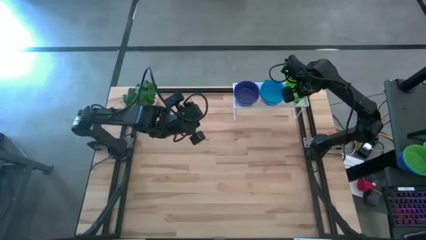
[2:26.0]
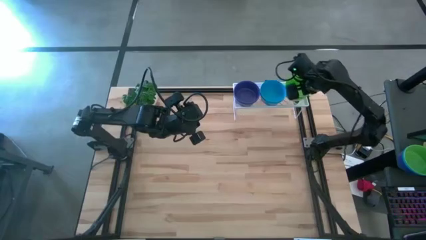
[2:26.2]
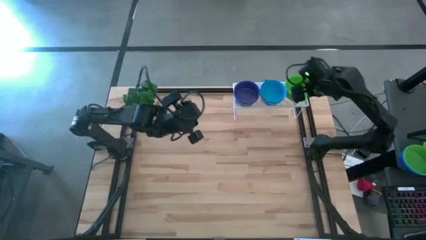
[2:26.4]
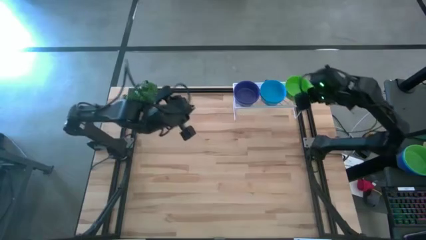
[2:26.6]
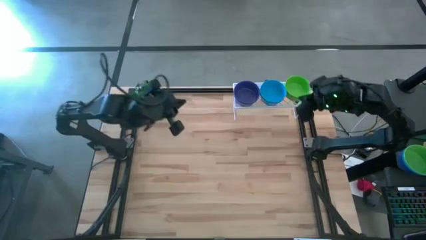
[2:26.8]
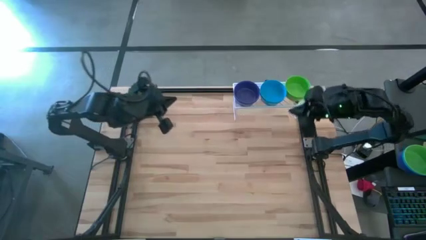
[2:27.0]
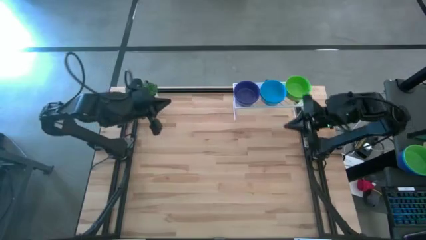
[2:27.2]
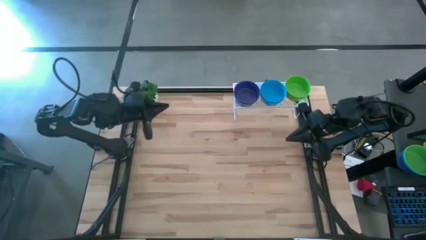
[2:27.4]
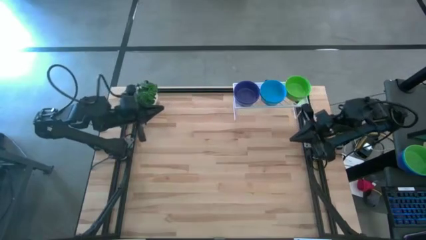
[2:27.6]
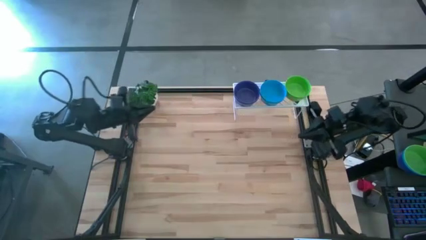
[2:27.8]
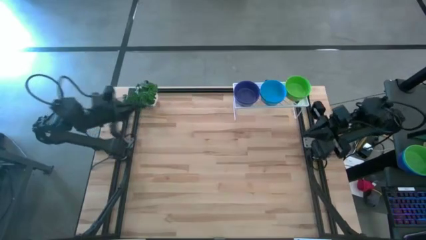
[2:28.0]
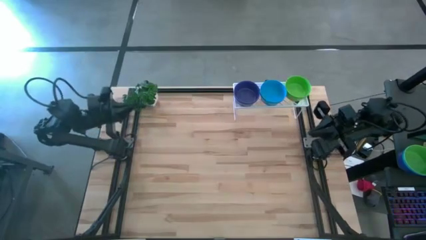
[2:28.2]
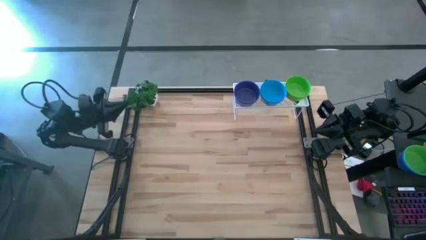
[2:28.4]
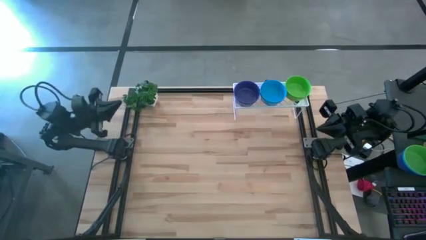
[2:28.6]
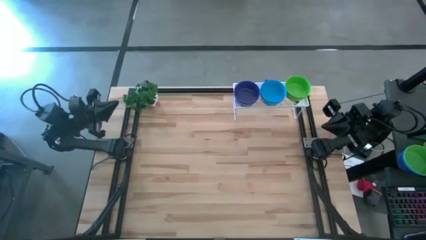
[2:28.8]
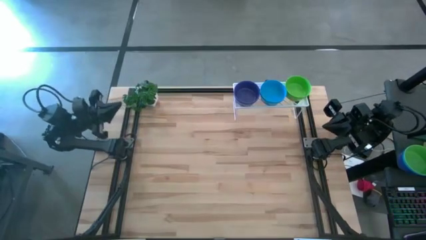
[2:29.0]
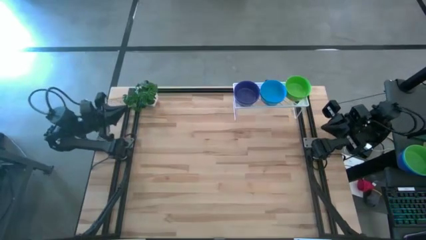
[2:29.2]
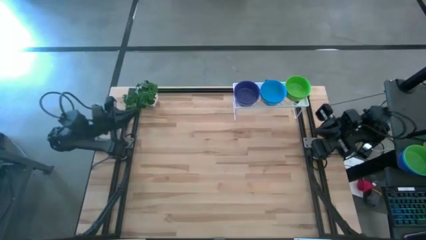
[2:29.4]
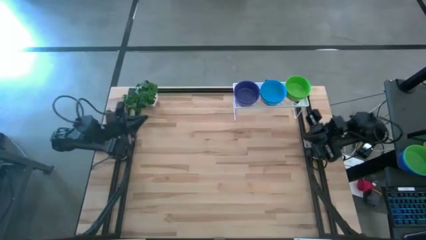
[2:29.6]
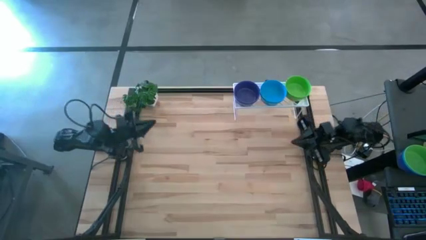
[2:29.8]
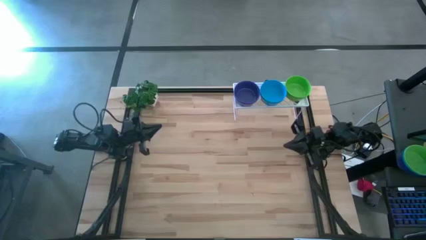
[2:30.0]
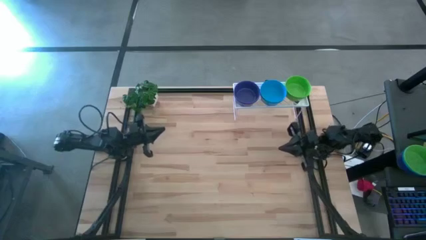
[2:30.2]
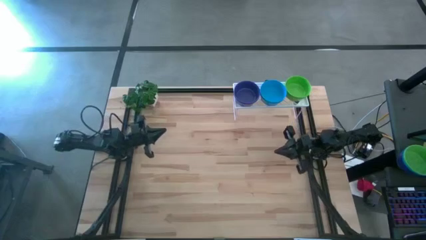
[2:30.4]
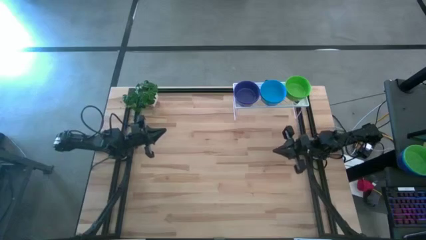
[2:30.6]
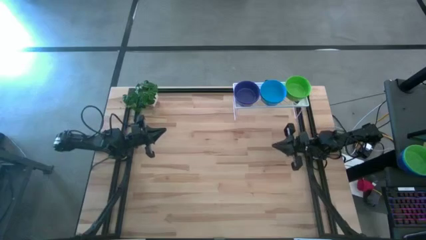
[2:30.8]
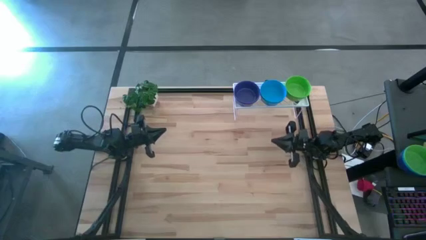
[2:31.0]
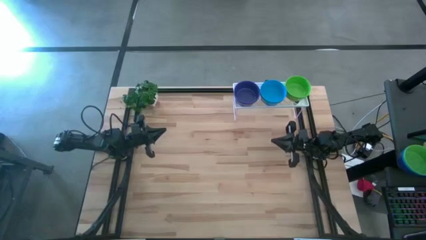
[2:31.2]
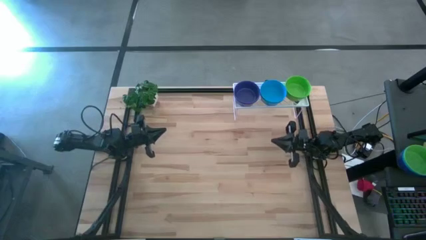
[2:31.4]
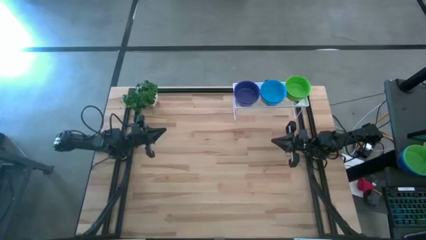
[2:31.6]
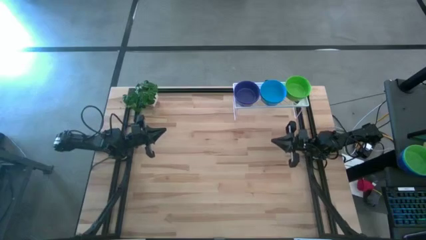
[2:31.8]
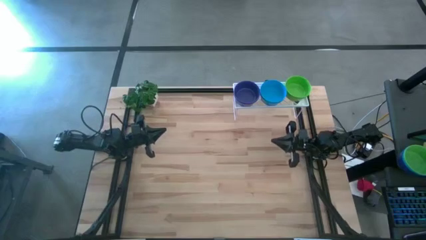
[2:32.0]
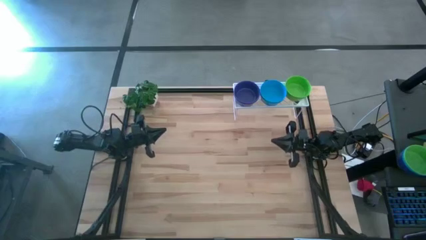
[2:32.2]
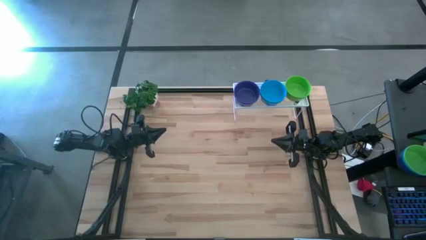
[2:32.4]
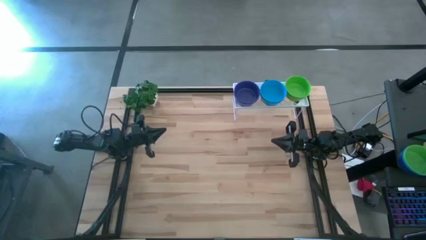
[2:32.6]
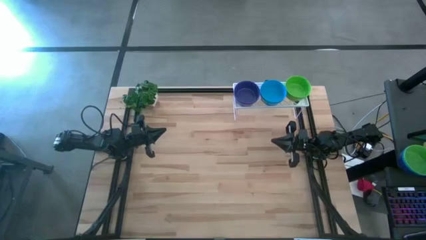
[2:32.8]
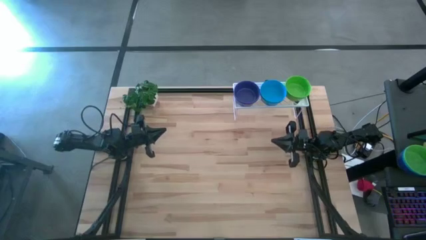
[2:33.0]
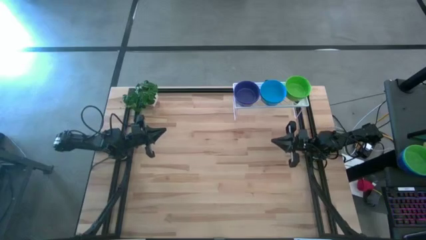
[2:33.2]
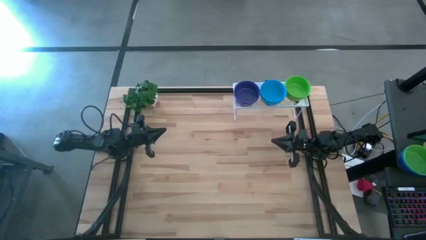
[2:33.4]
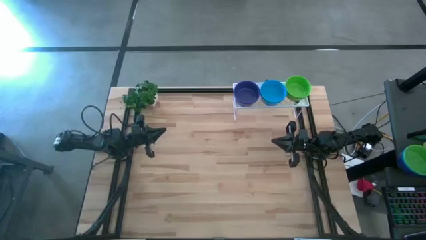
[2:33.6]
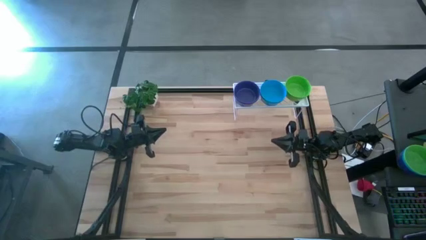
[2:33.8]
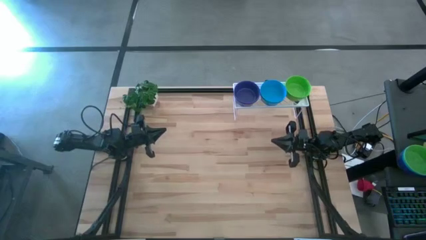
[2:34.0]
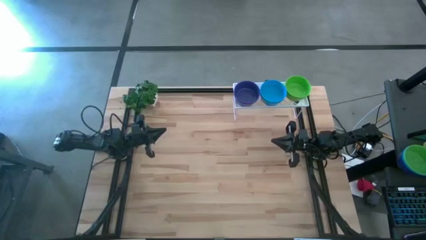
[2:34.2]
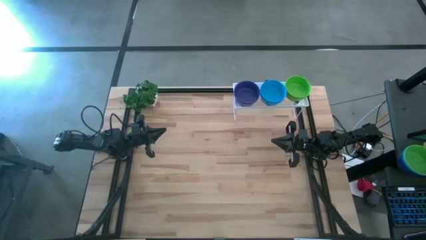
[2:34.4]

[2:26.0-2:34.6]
Task: Pick & Place Mini bowls
Return to Home Position

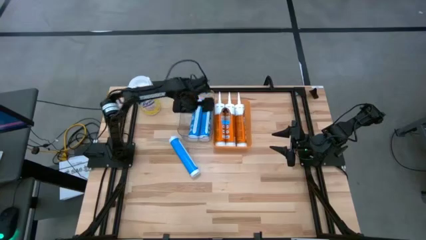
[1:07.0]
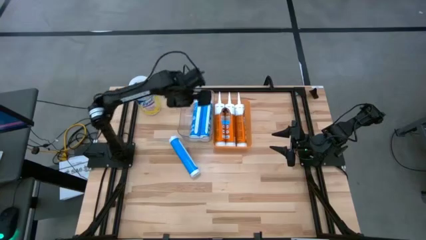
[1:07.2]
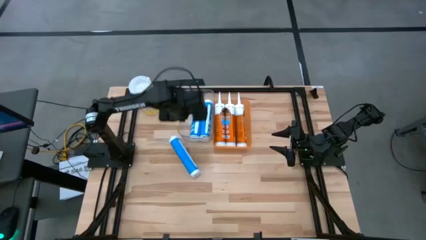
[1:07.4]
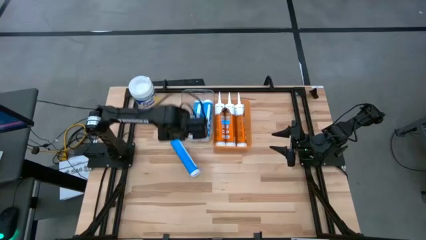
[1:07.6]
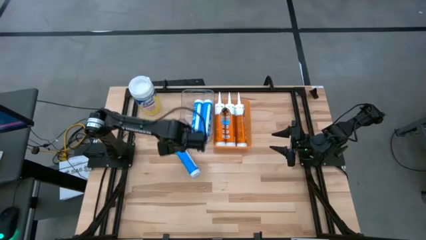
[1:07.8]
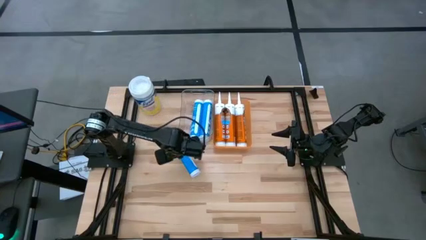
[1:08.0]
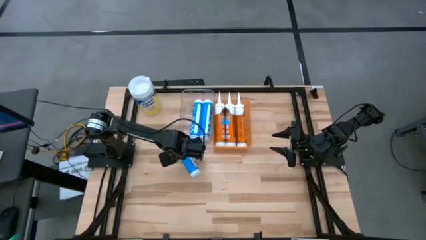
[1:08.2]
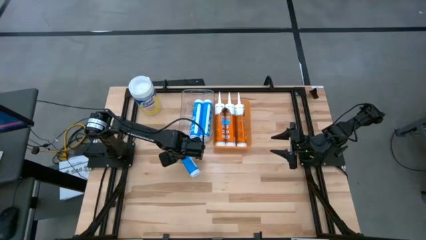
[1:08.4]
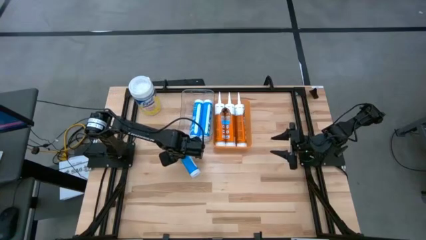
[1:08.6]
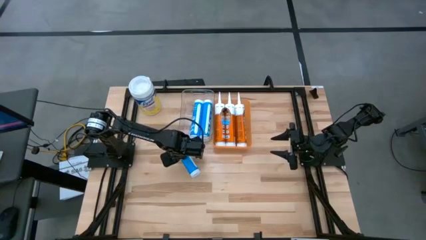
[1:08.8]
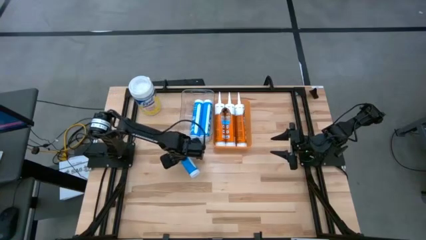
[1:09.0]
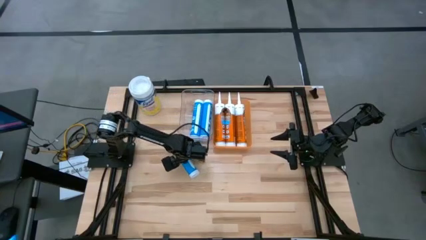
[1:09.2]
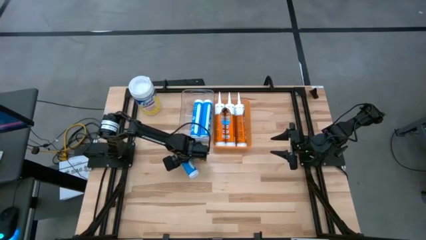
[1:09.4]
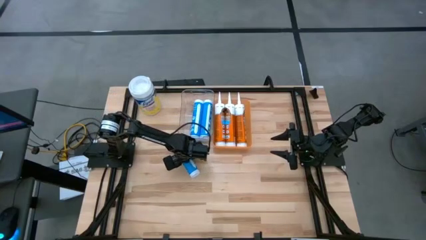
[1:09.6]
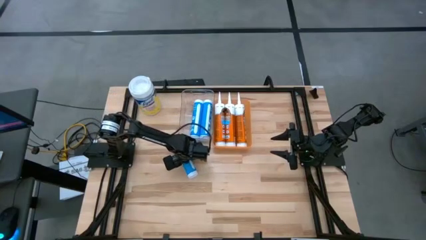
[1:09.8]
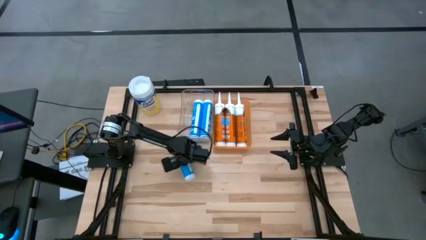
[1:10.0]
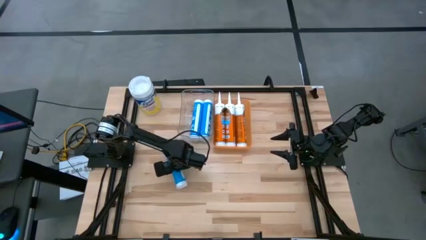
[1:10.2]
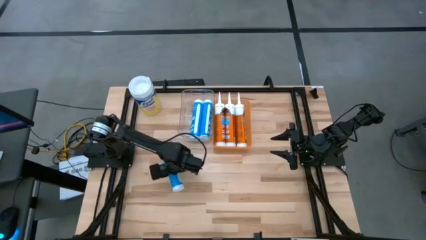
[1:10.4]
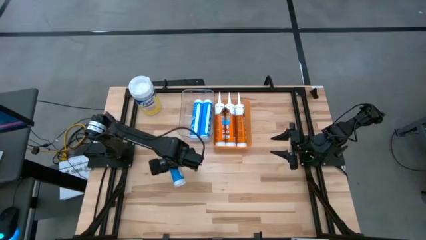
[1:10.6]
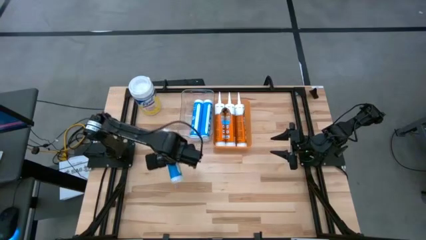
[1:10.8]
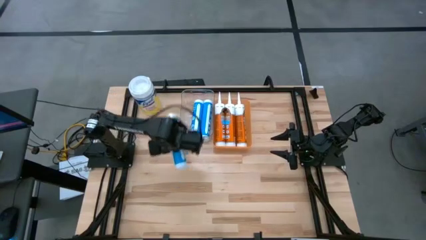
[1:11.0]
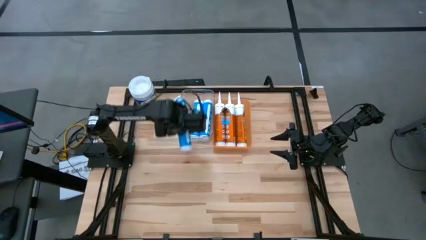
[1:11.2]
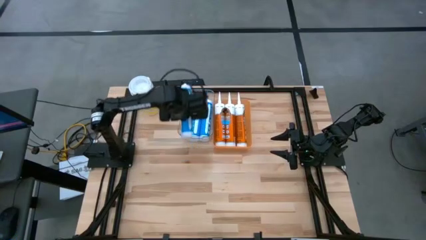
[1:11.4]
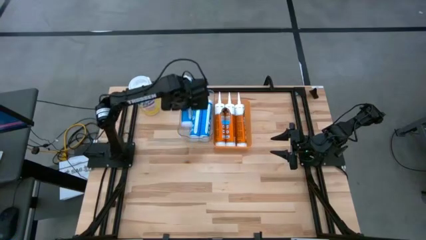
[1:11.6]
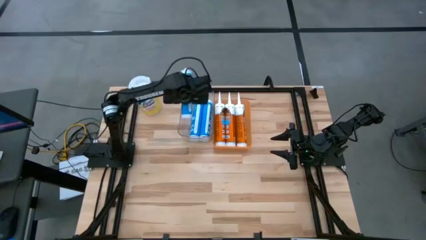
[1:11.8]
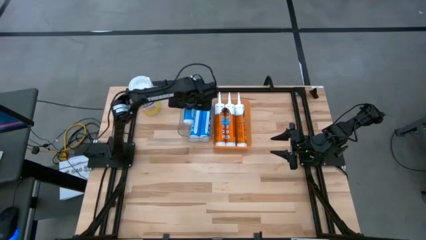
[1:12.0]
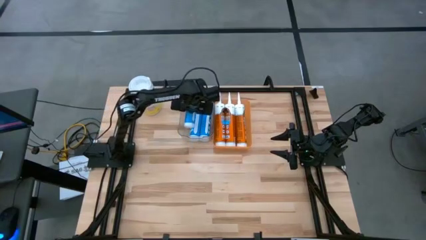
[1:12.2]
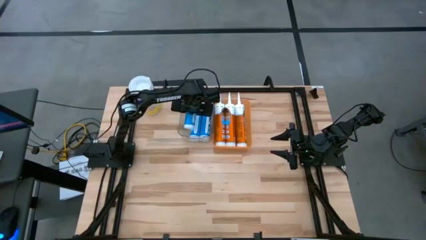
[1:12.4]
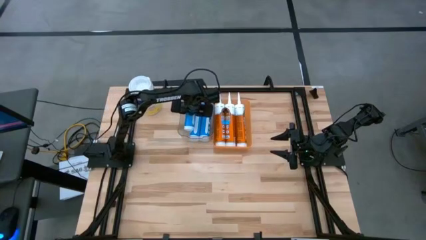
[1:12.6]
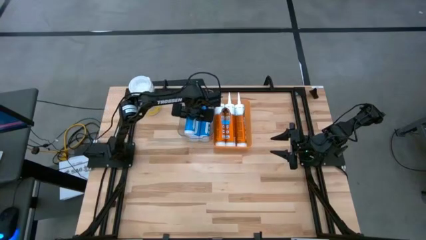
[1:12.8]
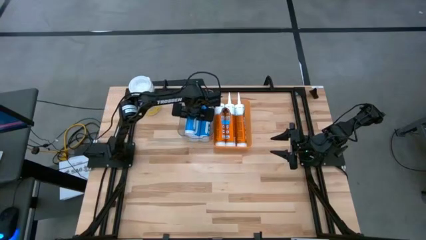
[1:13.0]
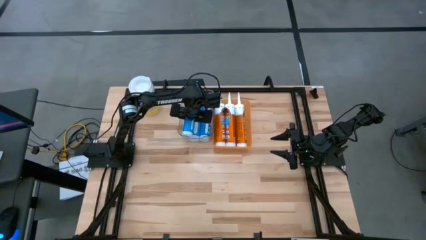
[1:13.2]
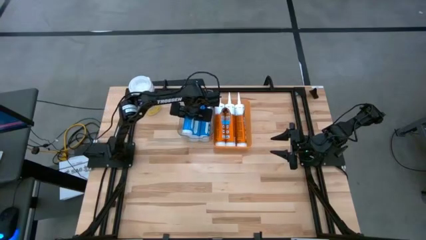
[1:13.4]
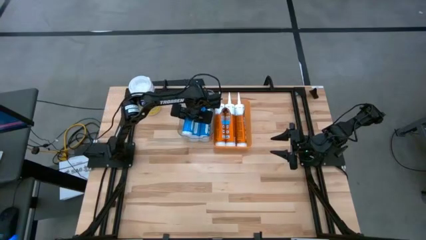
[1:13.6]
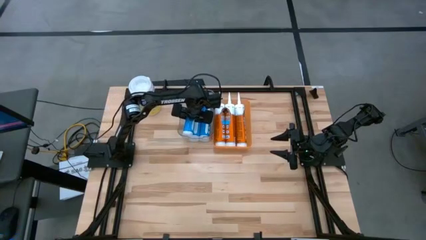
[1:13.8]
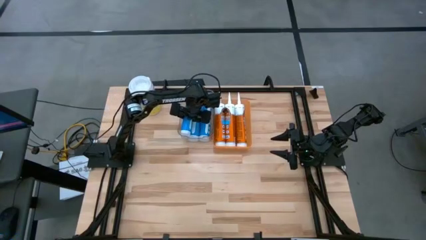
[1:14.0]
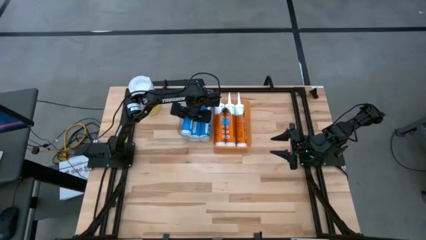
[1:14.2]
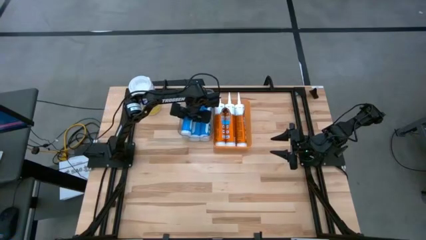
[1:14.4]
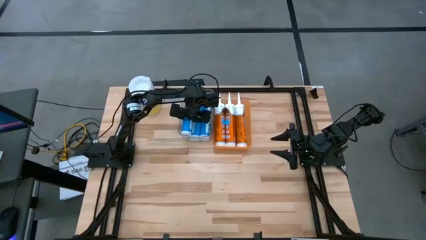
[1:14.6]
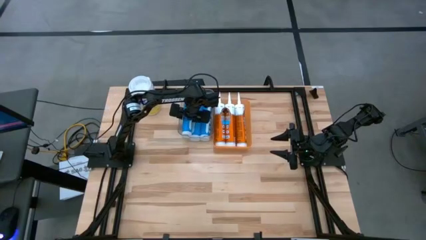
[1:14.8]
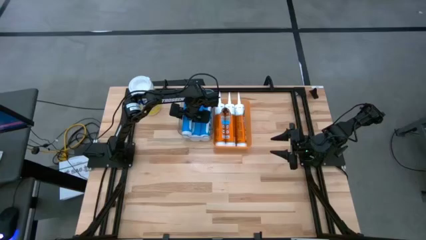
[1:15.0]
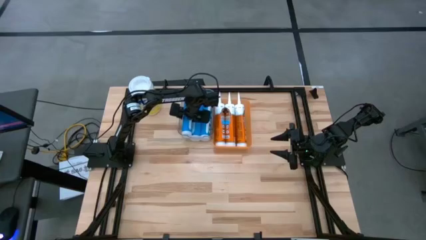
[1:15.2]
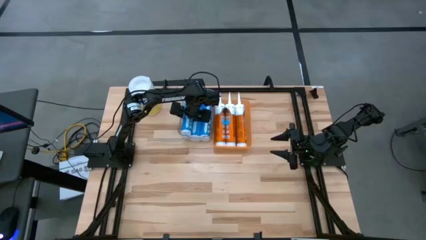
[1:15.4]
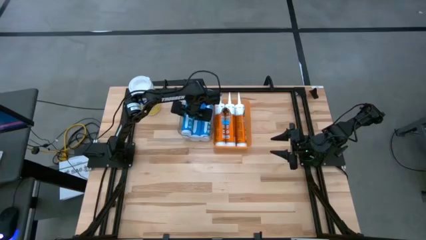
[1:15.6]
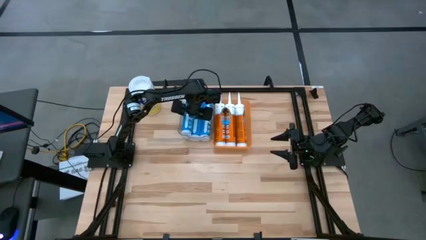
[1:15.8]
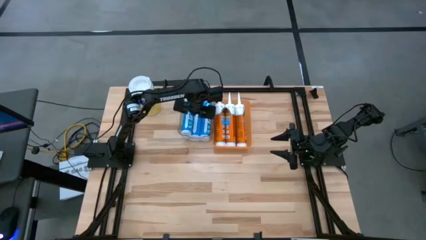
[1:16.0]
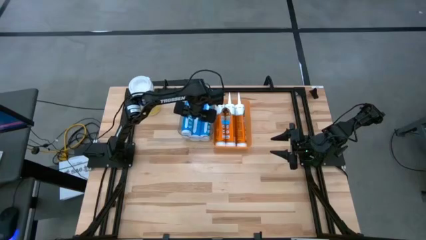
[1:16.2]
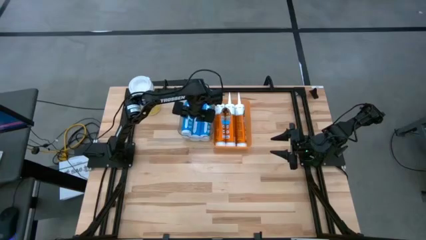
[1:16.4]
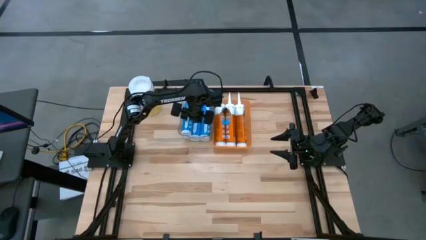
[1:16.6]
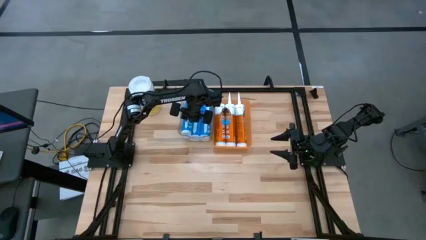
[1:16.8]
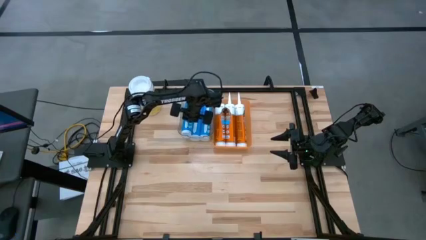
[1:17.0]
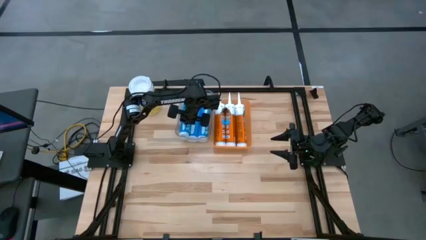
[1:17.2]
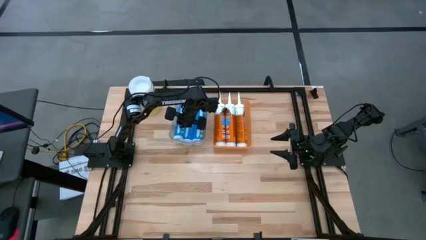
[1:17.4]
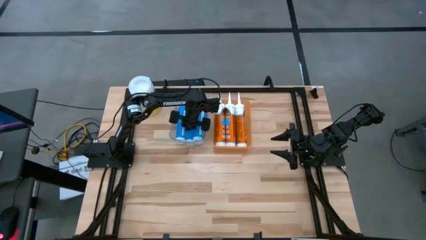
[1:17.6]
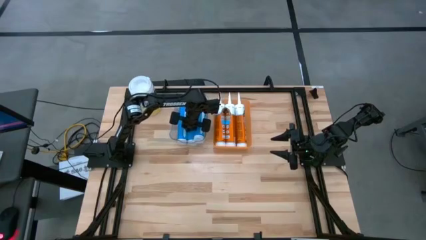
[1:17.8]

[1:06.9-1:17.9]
Task: Pick & place silicon tubes, Sealant and Lysol wipes
Put the blue sealant into the transparent bin
